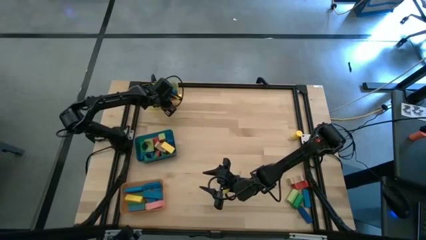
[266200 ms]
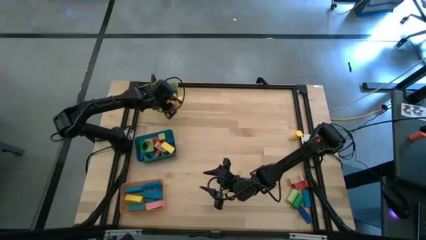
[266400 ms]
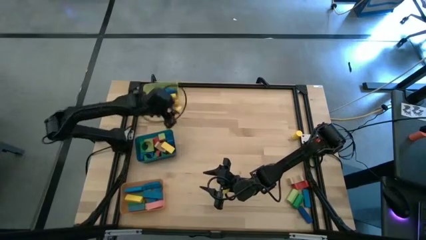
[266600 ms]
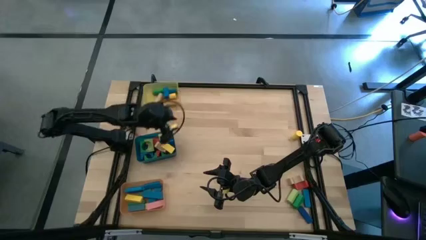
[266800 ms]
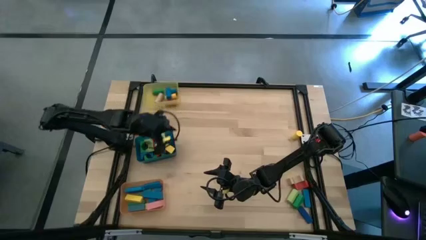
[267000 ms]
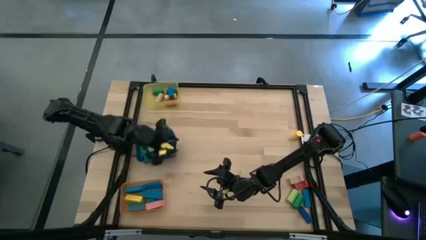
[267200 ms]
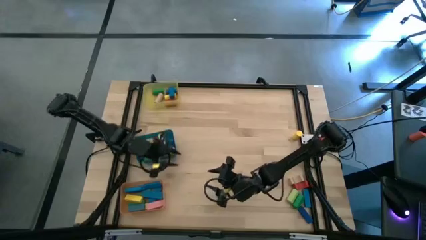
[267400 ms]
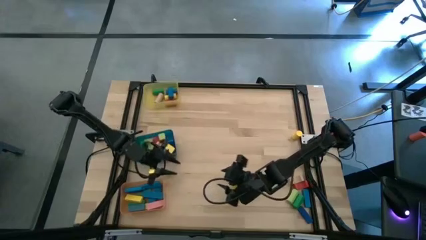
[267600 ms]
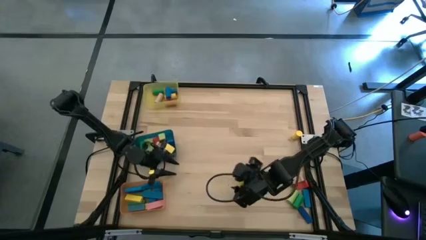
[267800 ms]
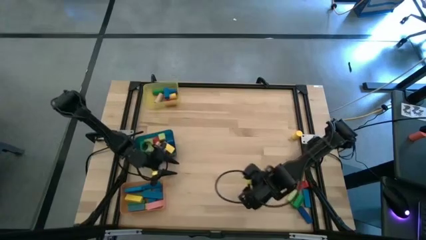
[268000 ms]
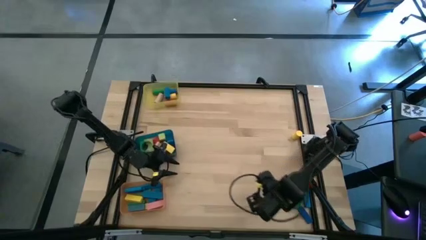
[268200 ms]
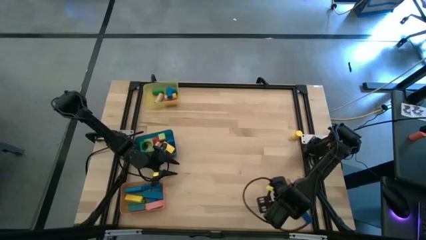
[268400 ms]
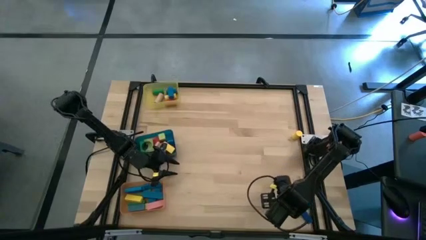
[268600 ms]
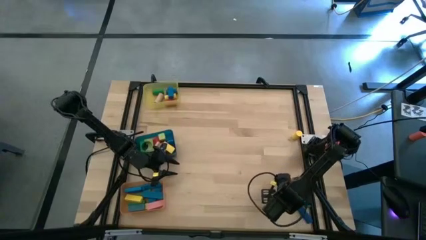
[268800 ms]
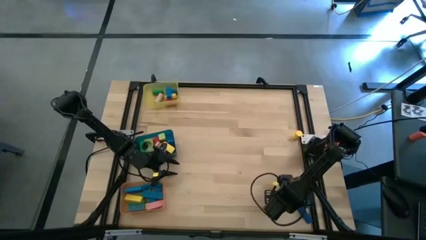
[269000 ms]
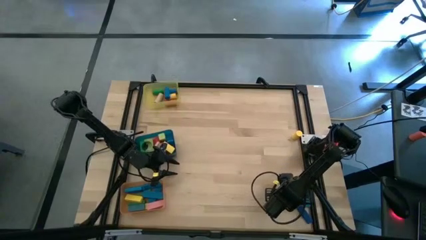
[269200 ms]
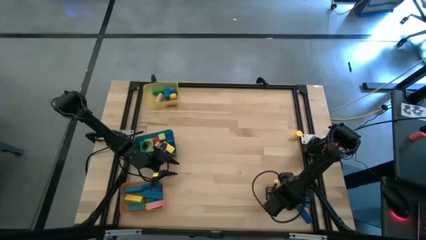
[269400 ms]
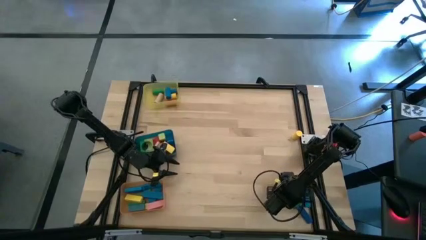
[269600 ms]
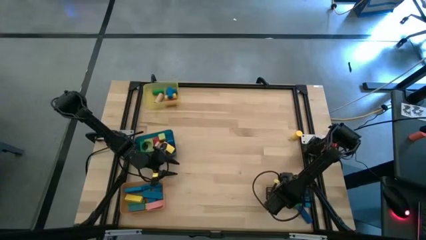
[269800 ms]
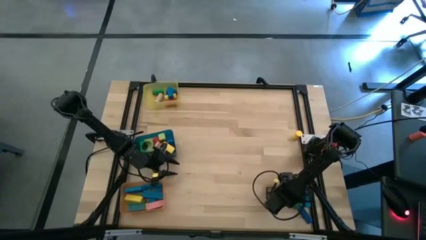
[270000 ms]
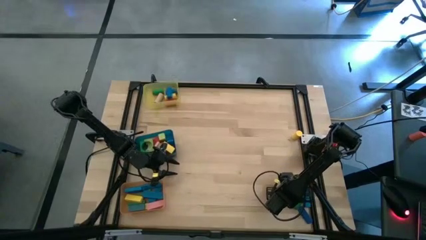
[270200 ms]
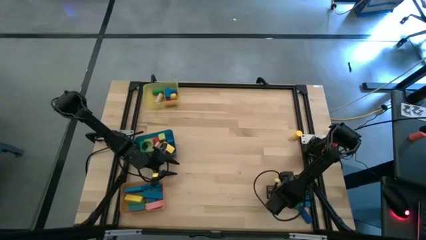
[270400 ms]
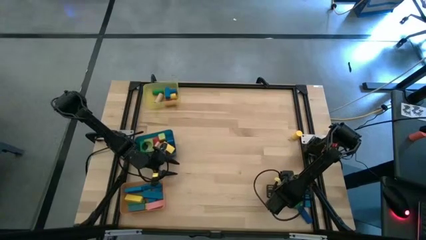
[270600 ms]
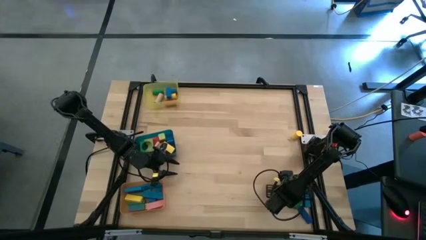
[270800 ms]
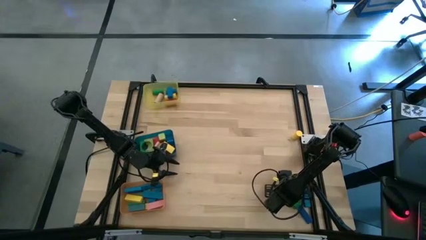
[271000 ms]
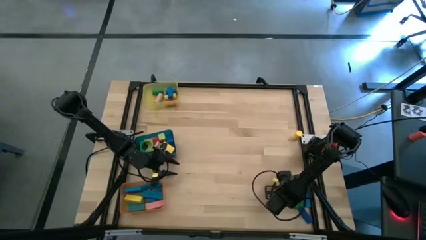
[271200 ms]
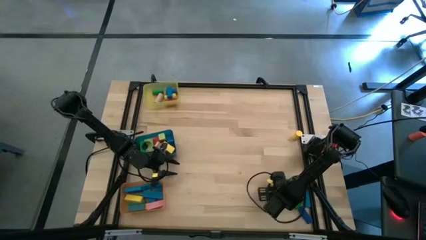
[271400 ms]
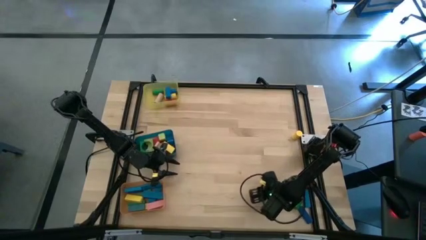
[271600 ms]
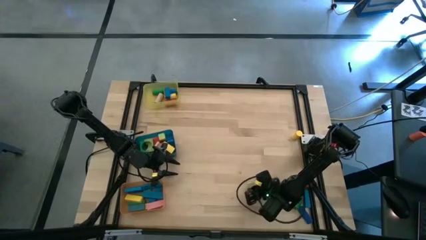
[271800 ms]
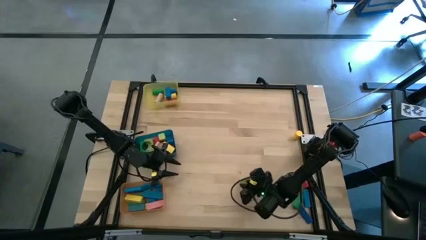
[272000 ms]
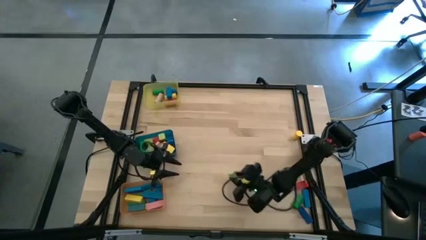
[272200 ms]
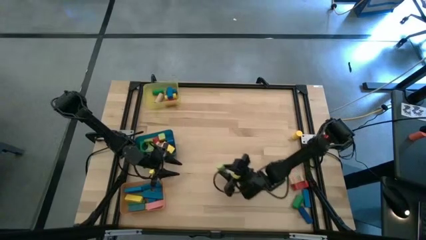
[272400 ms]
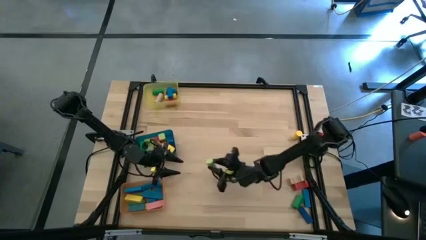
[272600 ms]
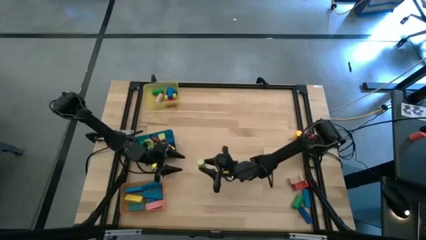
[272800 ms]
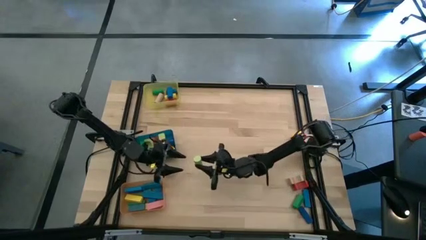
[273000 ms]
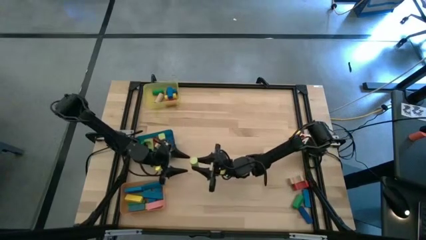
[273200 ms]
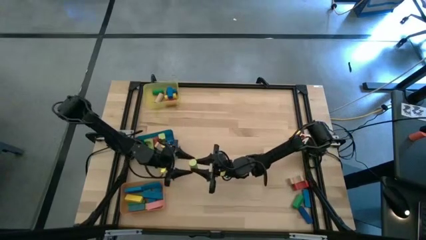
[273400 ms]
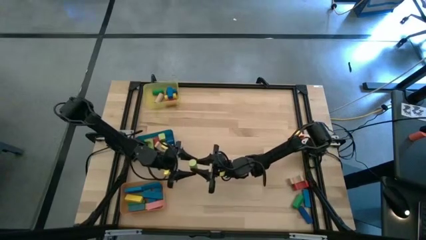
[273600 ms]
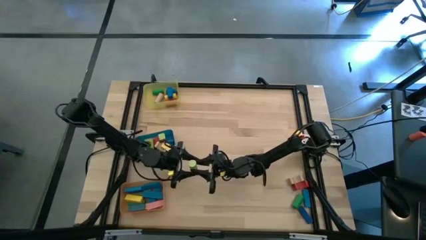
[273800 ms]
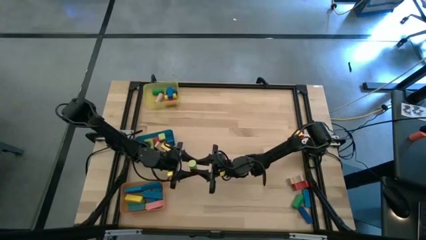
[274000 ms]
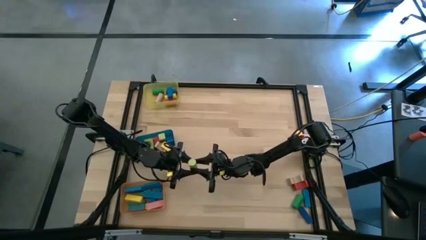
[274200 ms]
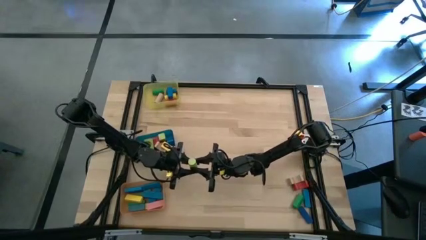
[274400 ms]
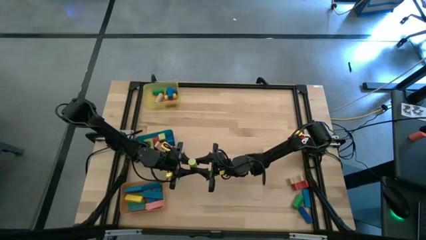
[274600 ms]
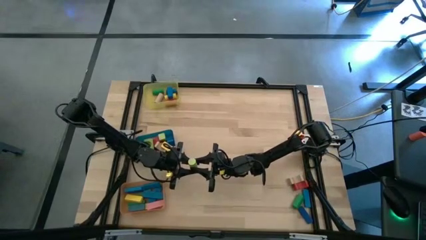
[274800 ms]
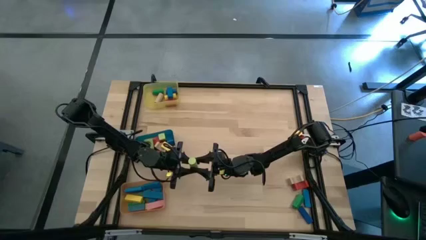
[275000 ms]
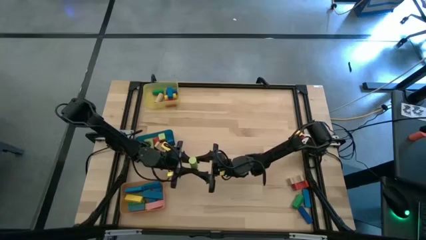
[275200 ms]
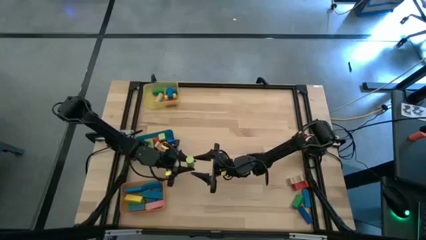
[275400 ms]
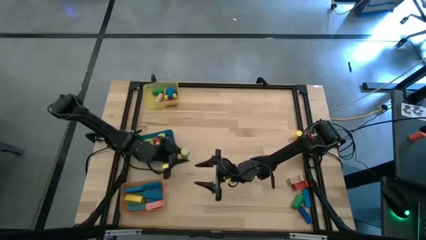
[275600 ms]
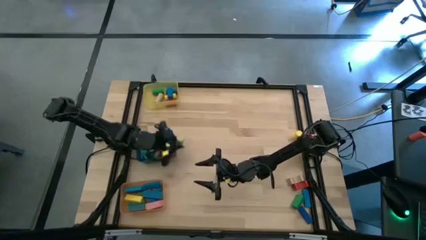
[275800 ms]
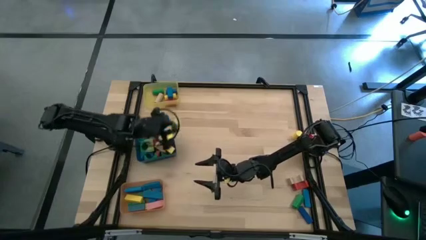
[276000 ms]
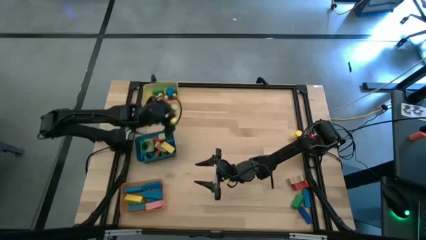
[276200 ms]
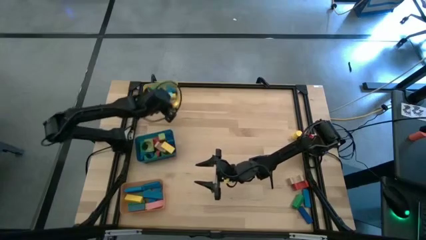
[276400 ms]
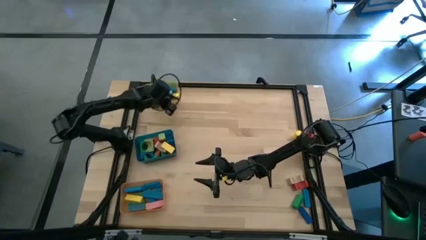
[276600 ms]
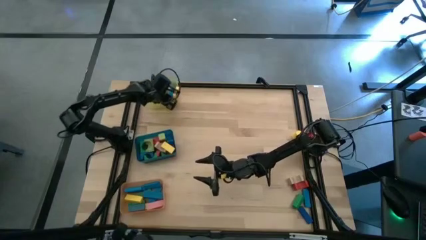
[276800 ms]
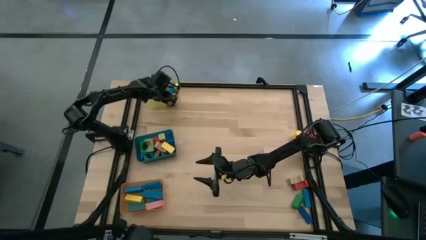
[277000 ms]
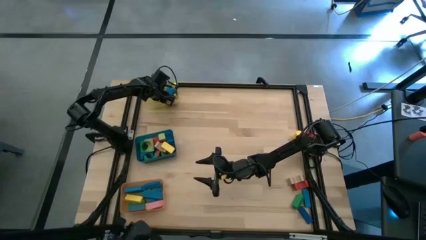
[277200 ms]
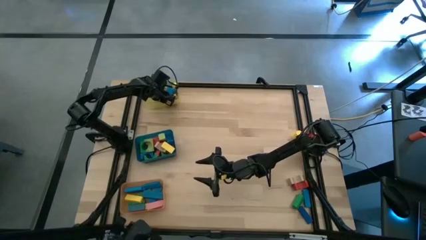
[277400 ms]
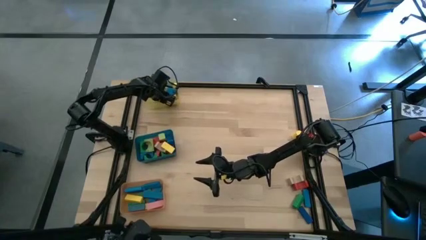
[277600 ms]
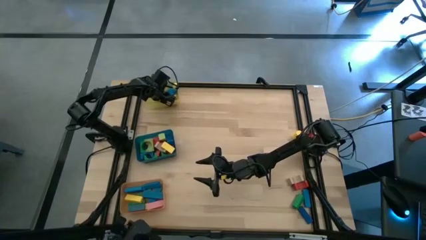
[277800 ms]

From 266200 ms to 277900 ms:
Task: Sort blocks by size
Put the light green cylindrical block into the yellow bin

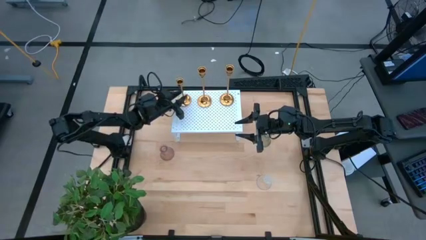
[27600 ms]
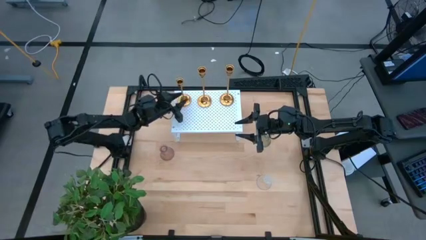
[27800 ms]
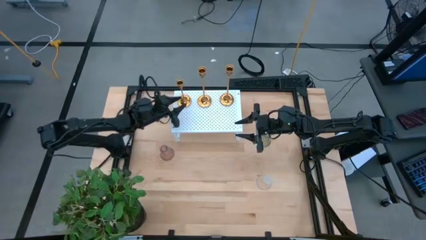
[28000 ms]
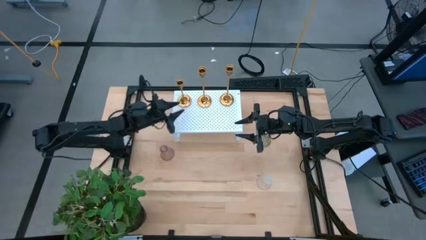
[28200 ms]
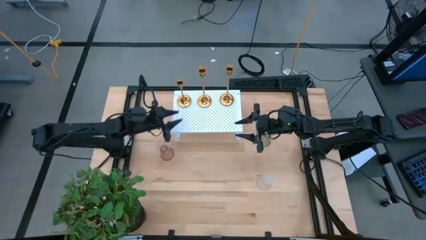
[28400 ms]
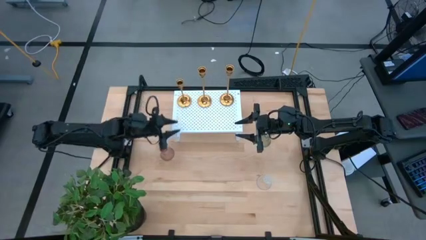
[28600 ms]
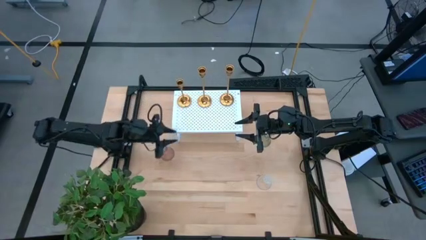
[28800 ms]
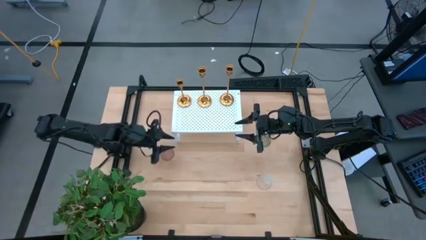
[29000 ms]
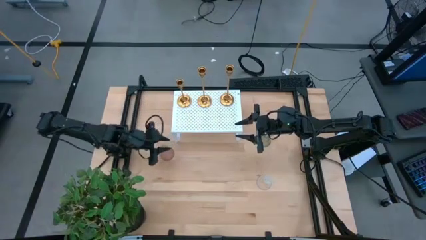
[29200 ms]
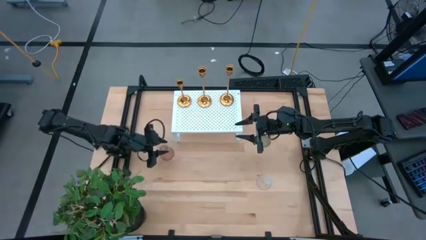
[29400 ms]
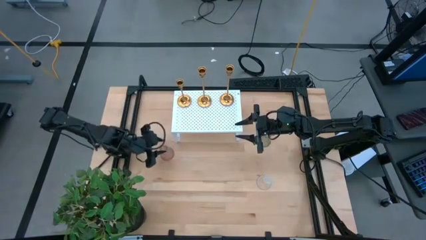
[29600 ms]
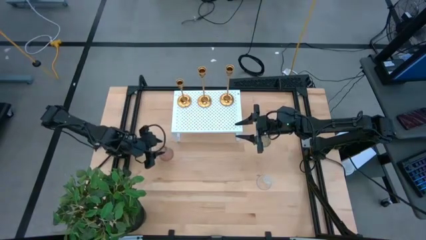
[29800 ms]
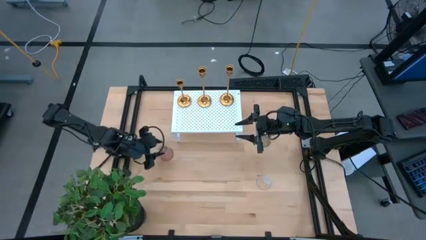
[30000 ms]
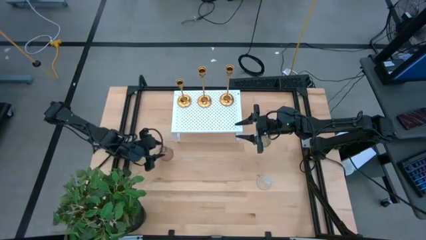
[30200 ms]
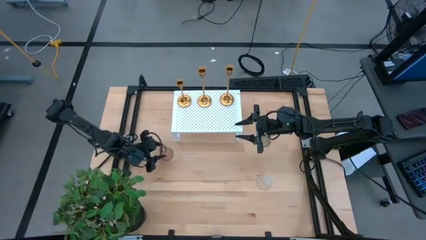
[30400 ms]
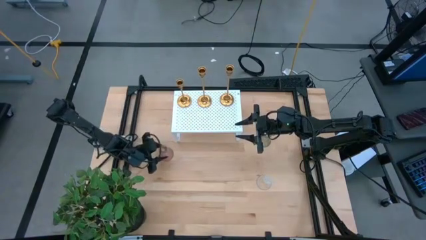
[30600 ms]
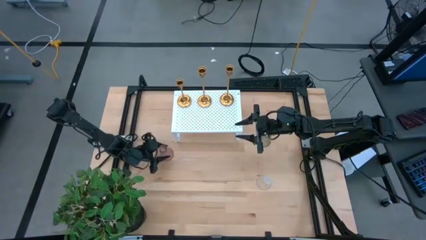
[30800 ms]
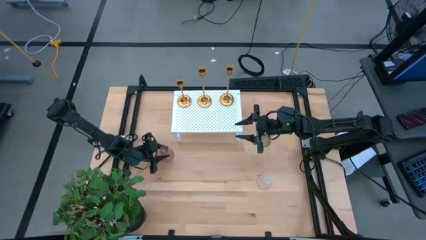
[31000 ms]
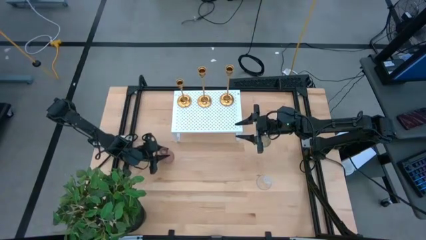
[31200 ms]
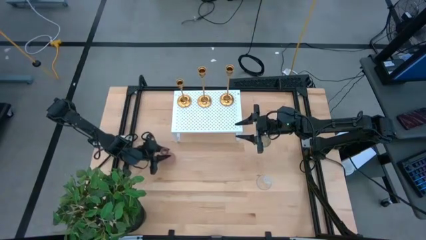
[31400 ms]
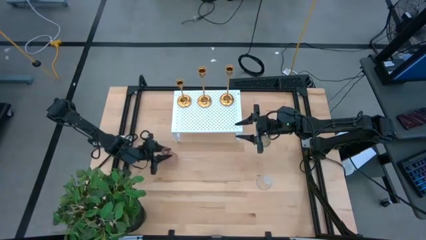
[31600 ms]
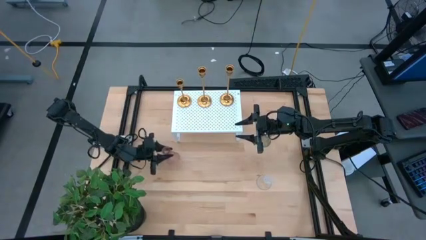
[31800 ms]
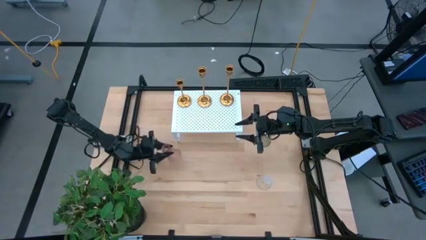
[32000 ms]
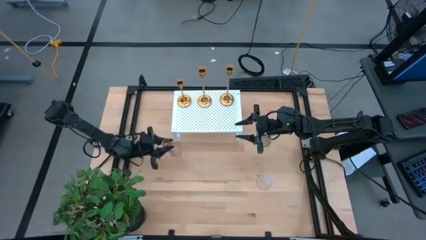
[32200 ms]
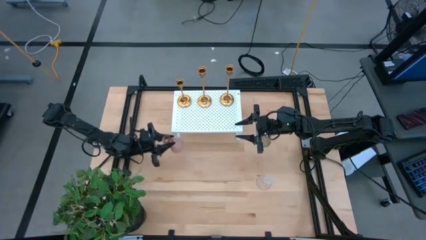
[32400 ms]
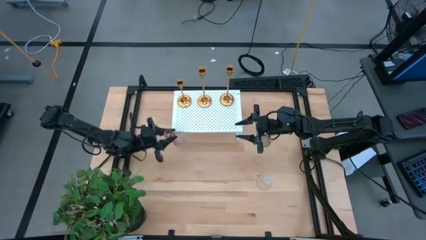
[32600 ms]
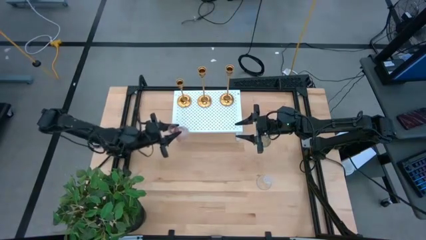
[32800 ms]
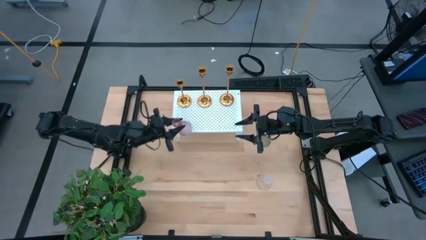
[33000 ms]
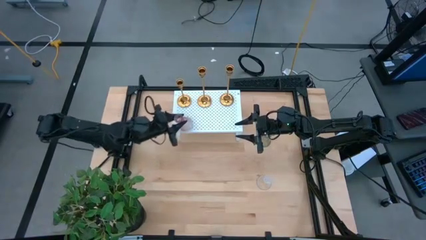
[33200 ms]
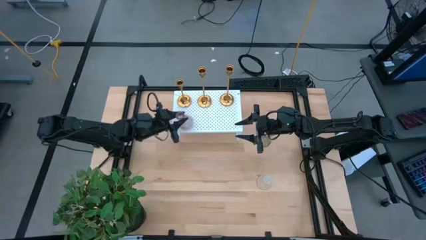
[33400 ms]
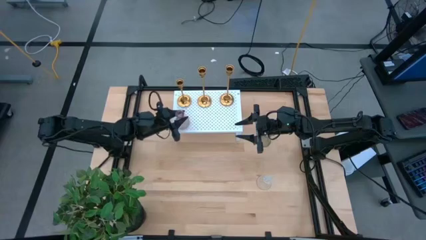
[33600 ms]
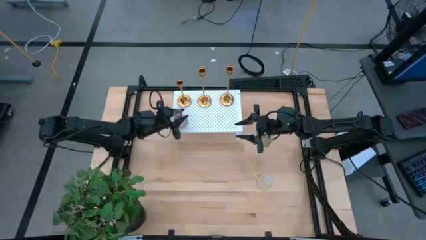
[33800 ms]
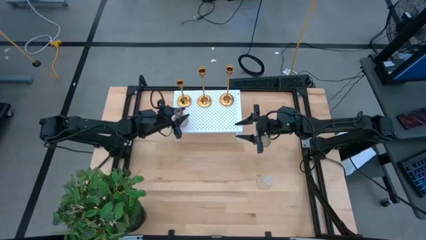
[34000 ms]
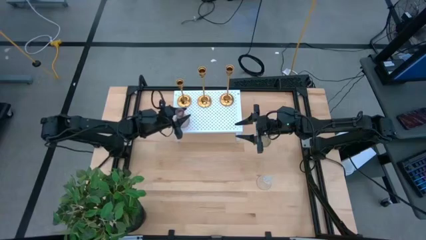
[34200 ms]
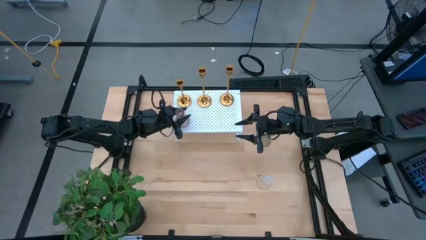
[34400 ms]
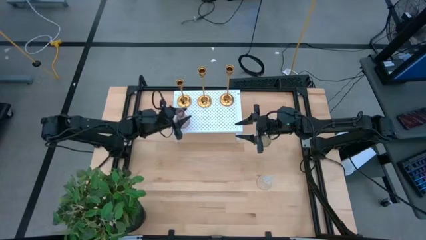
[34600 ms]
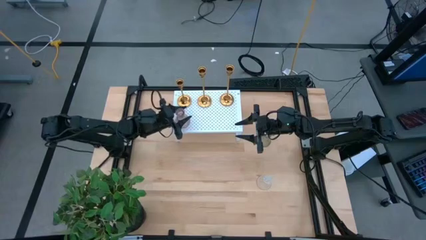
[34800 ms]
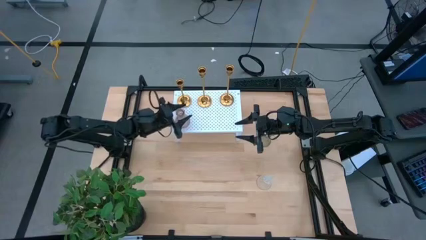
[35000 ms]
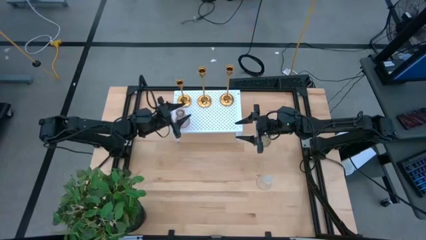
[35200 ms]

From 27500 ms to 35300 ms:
Task: Pick & Place candle stick holders
Put the pink glass candle holder on the shelf
